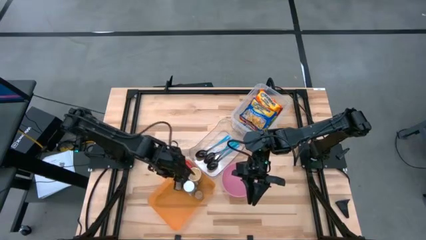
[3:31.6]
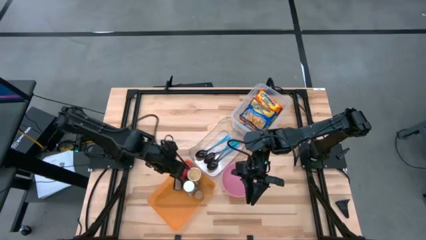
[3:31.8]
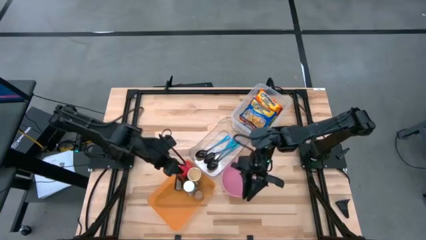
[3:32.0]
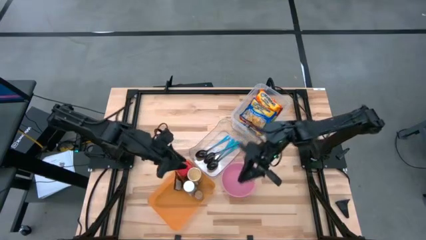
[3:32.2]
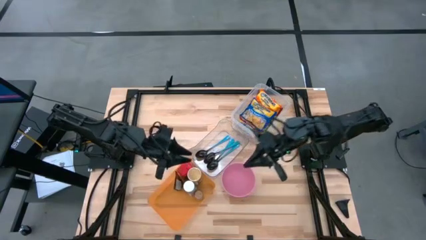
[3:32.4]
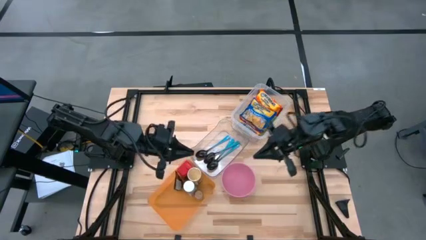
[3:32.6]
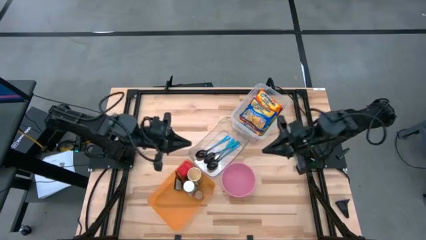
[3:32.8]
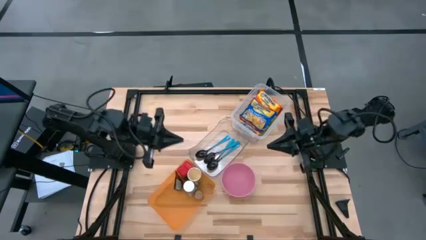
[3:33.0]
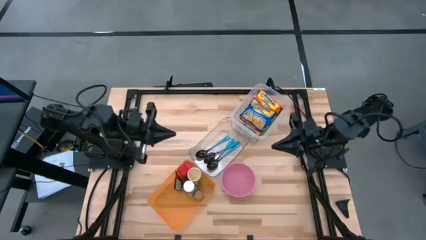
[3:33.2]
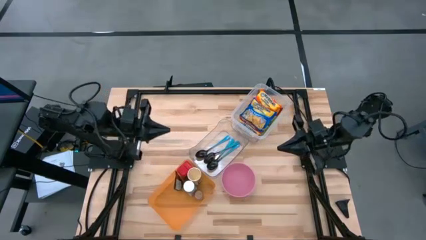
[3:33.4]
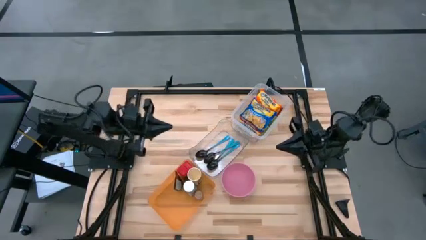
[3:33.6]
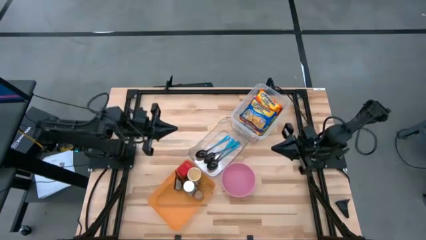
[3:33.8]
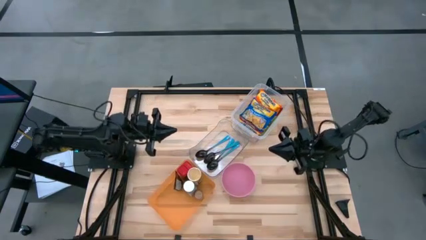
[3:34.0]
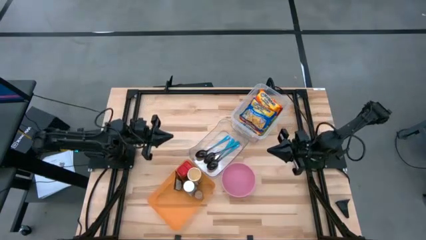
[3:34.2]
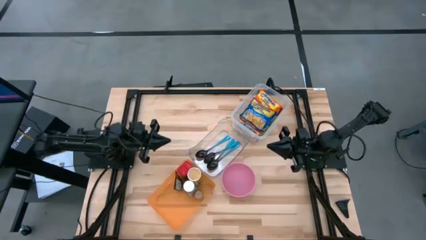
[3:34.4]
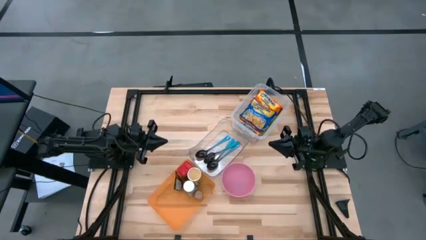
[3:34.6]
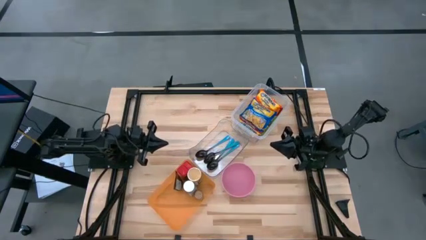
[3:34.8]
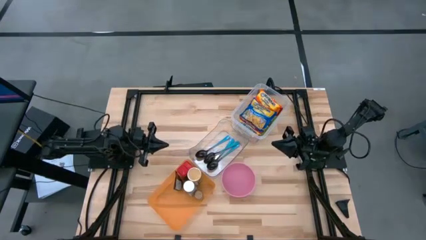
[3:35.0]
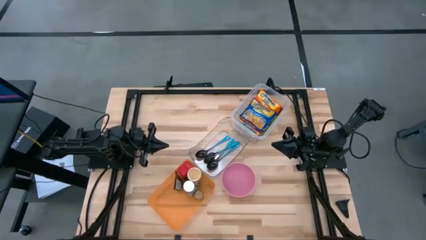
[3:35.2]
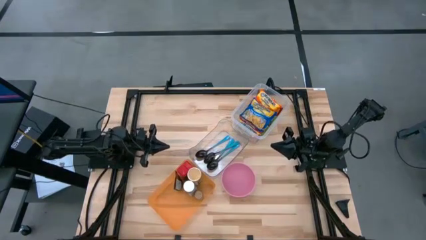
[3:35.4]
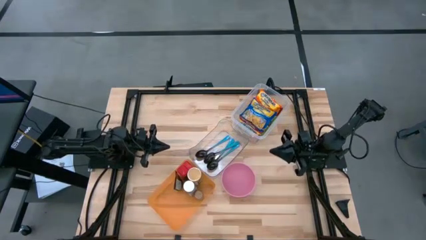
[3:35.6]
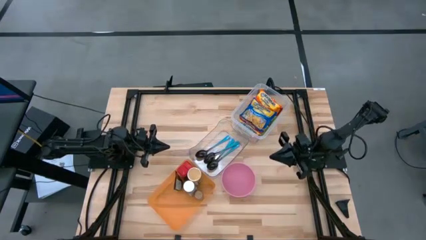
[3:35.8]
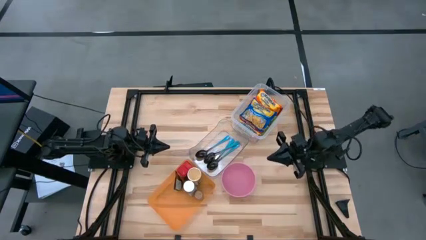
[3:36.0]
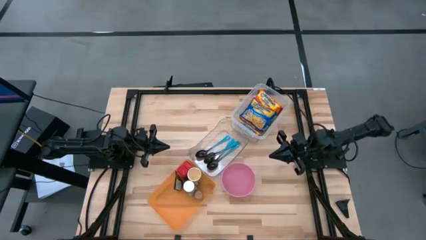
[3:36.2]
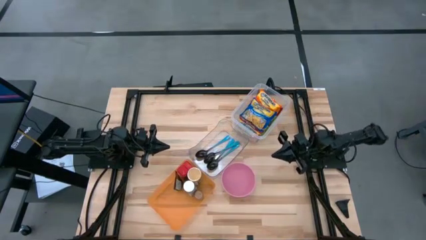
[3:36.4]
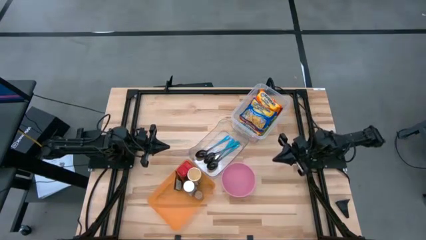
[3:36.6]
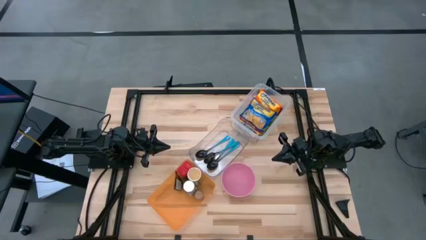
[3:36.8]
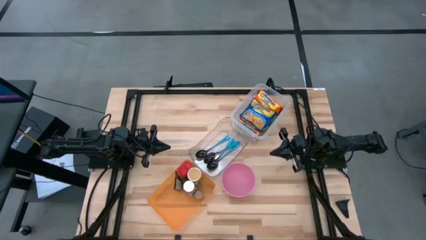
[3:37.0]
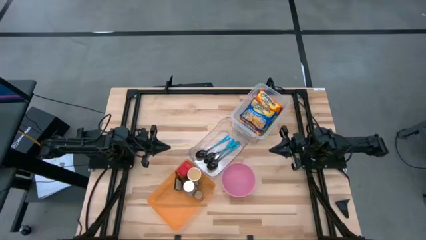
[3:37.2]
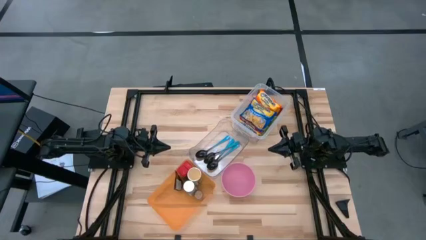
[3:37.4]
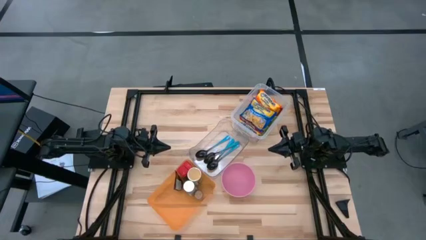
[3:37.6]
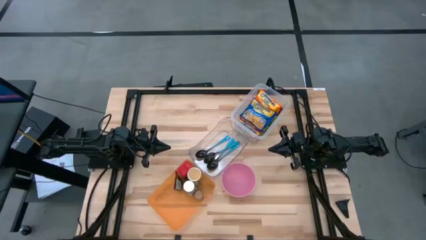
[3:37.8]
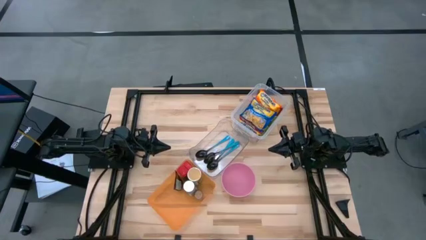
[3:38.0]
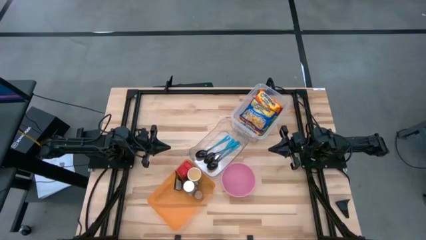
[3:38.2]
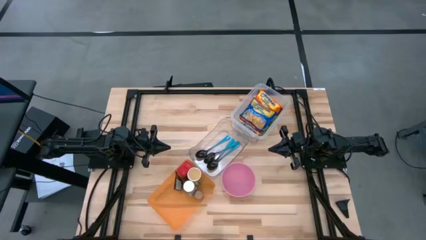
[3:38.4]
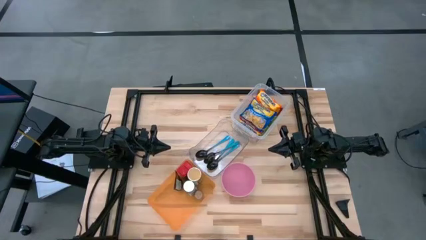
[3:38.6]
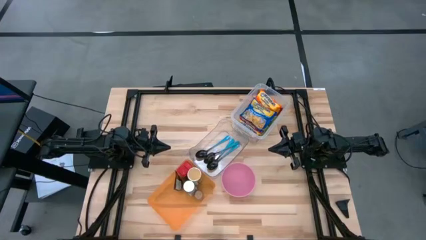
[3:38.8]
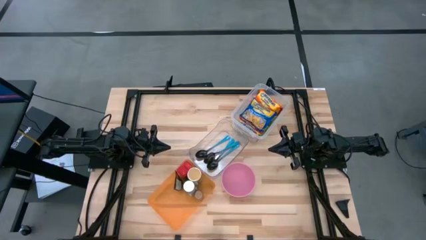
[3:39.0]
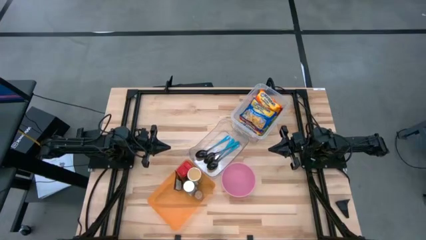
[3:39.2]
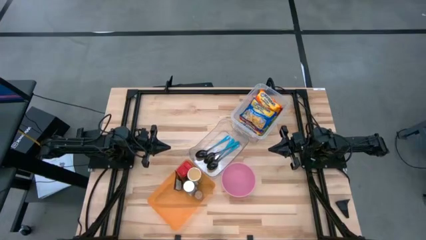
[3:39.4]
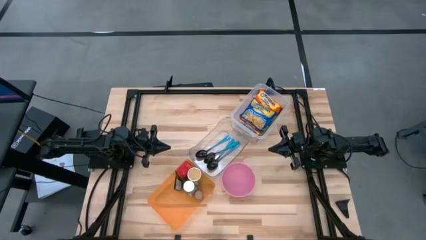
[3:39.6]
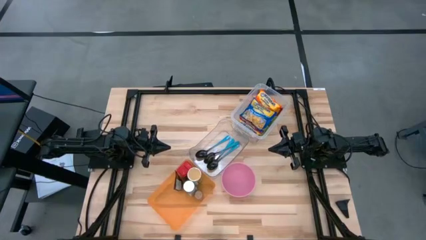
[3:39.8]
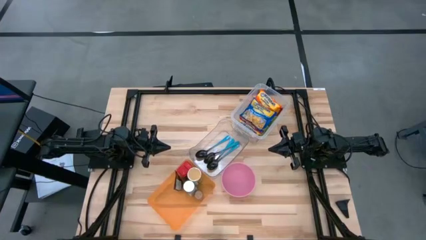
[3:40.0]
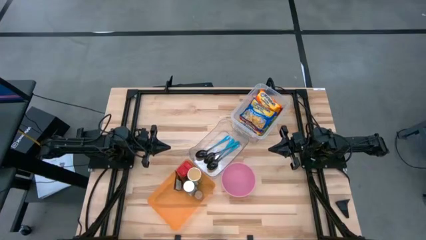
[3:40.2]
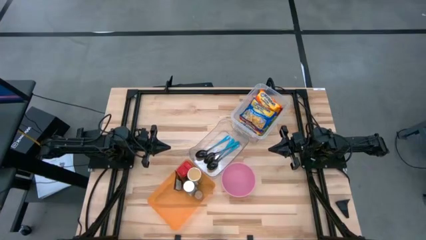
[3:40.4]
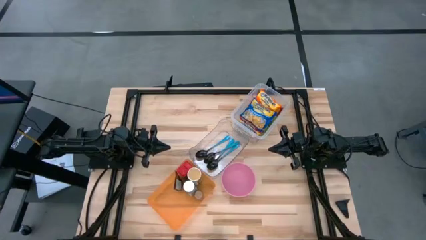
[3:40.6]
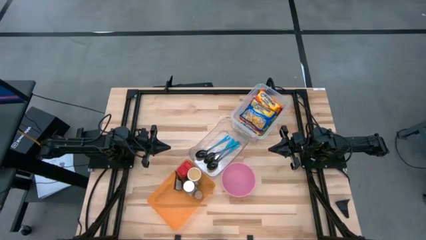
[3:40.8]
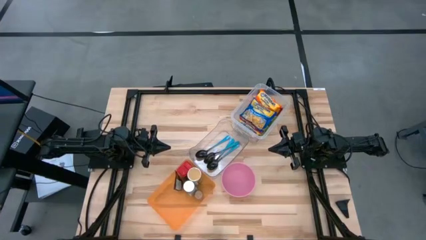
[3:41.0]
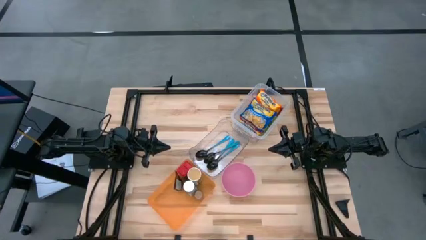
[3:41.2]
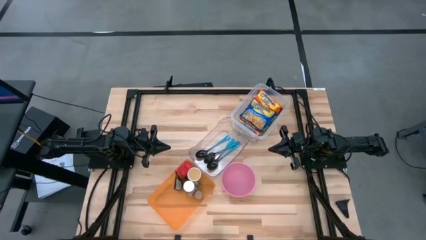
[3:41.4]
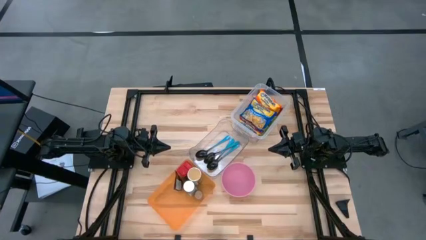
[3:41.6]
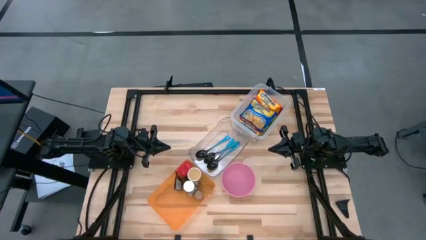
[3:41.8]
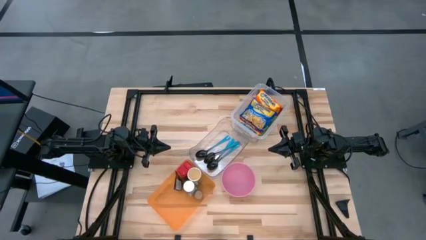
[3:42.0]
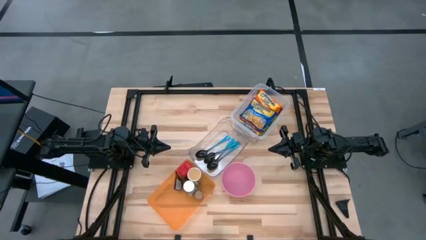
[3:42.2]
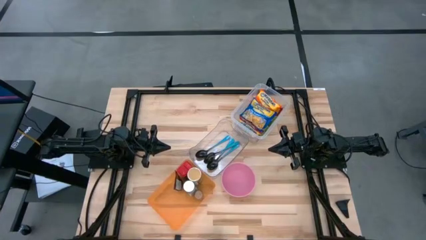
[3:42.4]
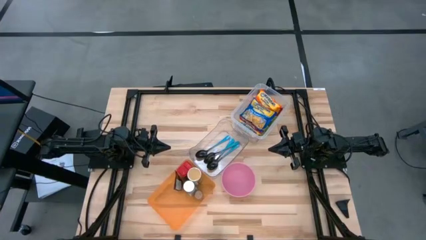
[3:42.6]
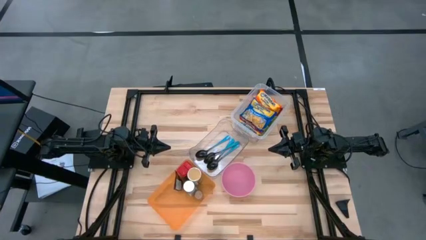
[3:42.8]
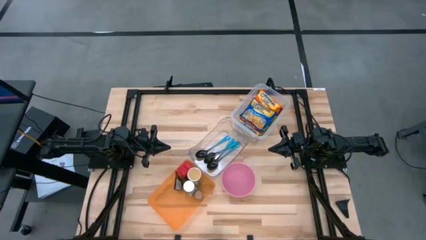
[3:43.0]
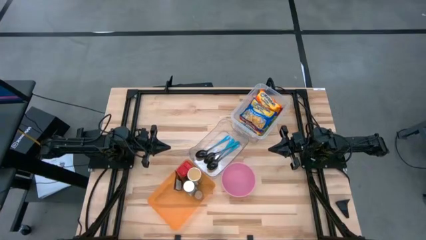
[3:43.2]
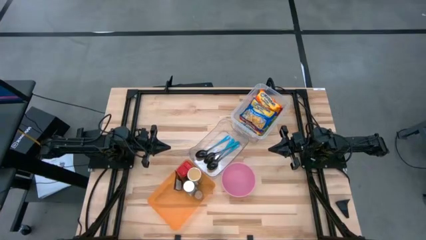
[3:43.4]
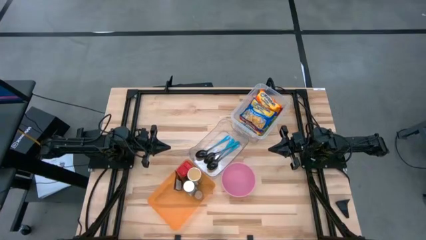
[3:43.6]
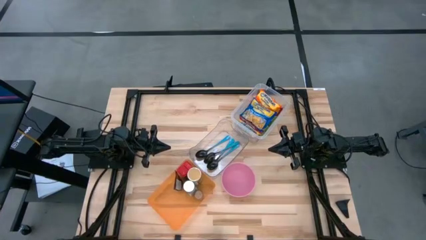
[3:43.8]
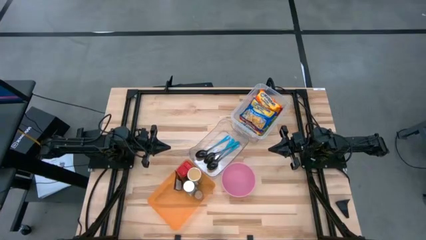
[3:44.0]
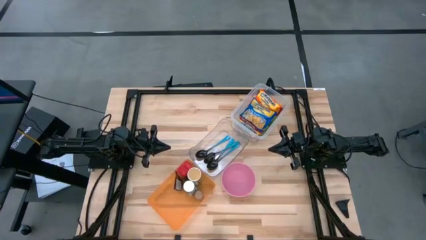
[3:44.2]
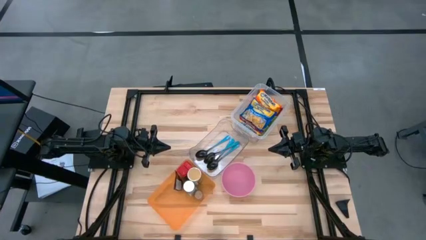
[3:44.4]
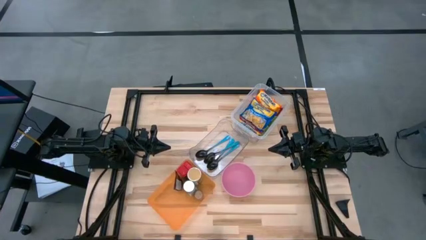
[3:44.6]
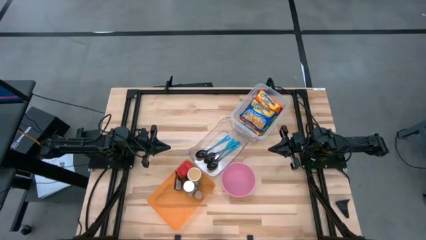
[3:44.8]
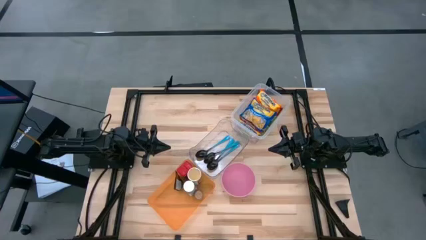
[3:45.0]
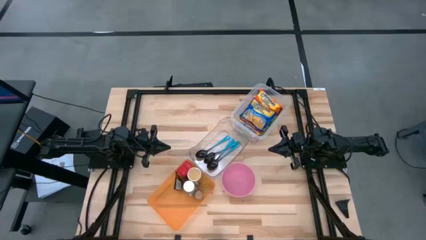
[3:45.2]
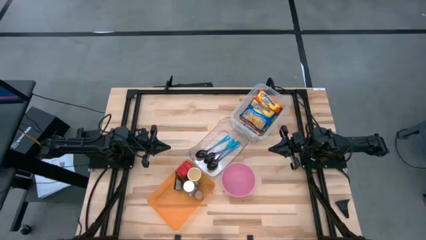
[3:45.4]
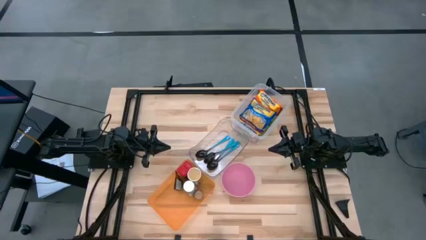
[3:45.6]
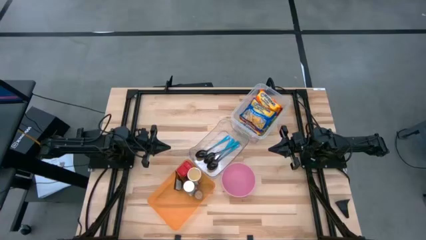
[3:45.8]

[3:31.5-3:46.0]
Task: Pick & Place Food Item
Return to Home Position
